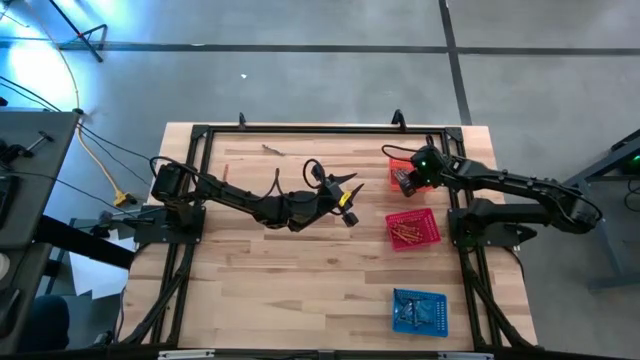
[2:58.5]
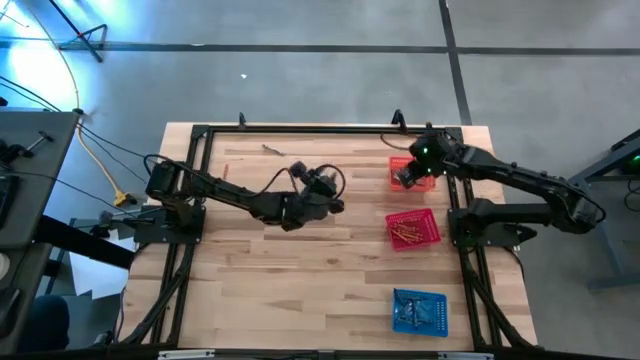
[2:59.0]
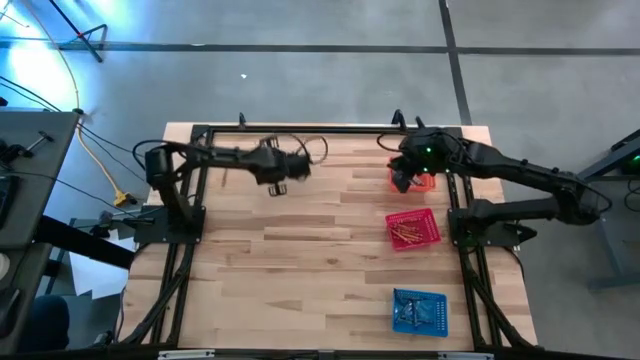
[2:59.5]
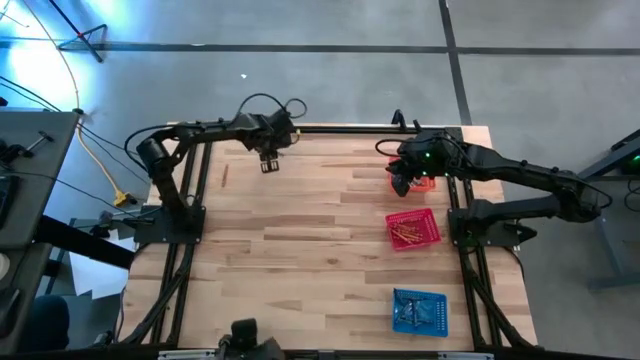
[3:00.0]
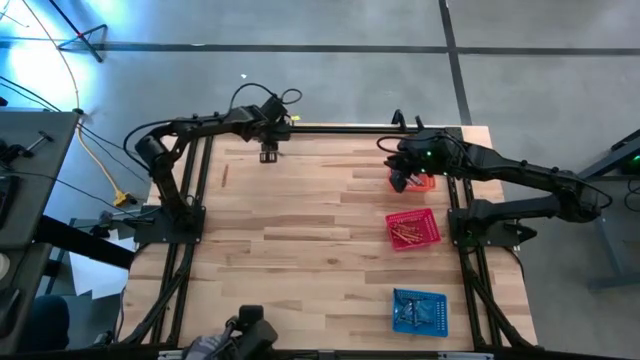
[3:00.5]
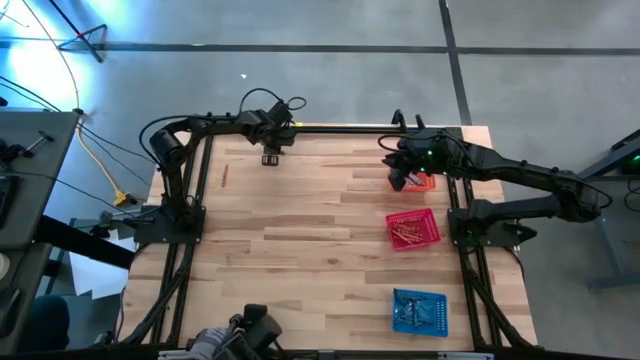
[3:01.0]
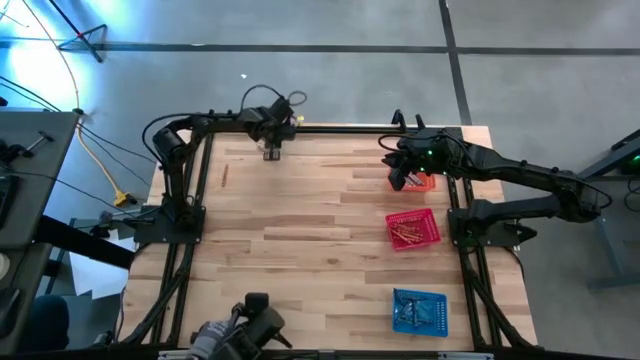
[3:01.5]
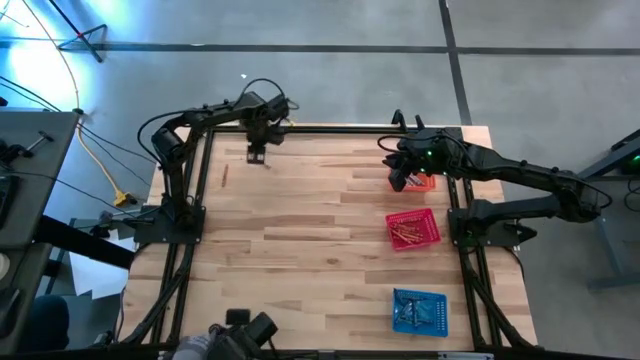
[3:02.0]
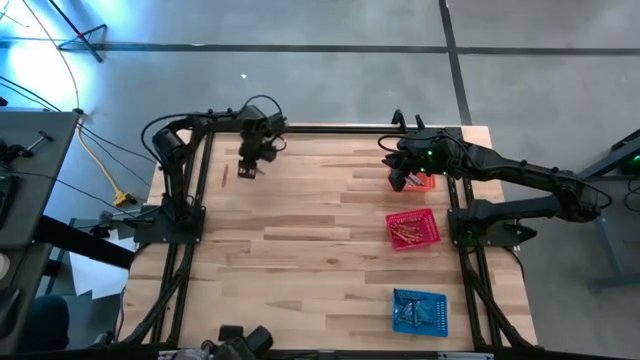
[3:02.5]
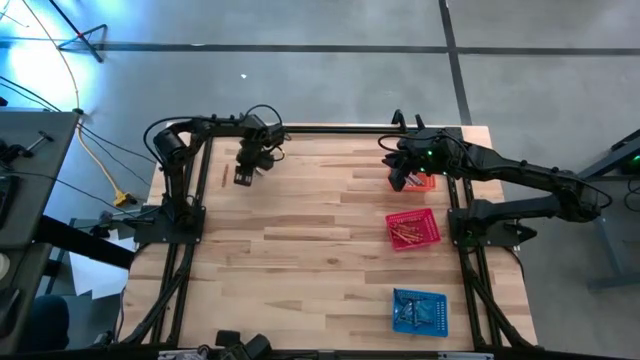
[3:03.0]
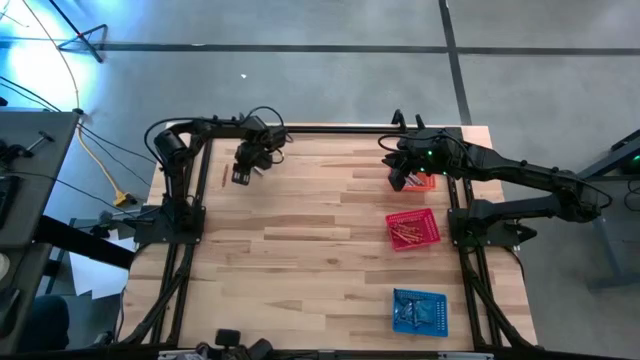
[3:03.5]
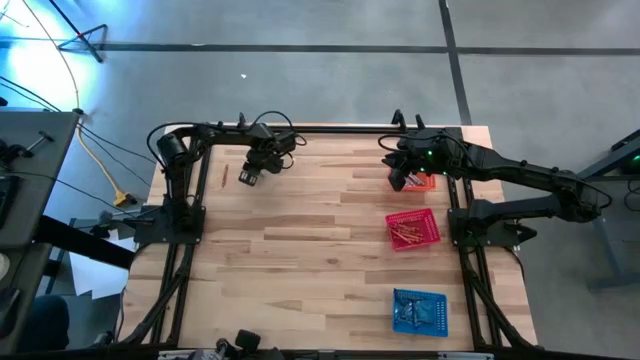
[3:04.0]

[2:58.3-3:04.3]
Task: Sort crayons
Put the gray crayon into the orange bin

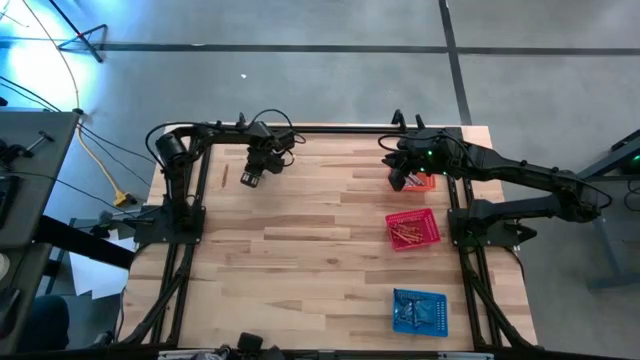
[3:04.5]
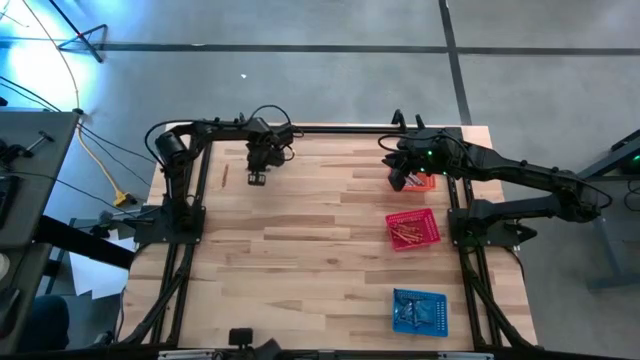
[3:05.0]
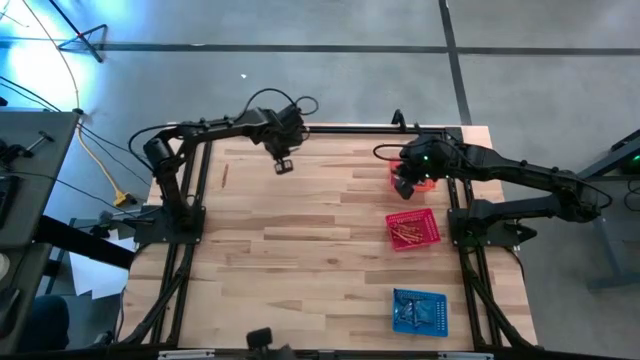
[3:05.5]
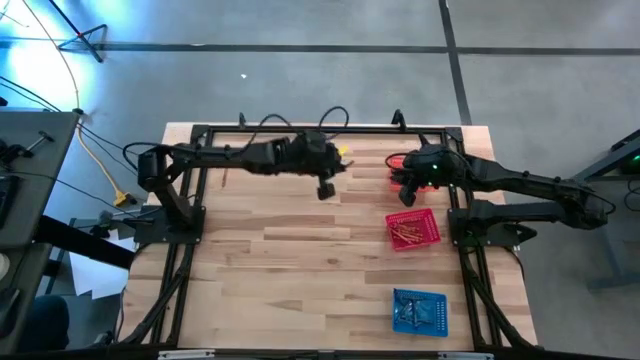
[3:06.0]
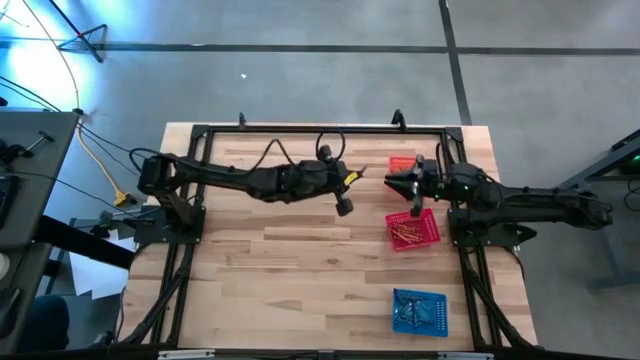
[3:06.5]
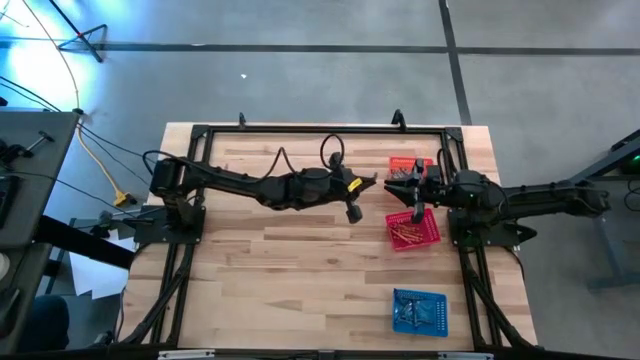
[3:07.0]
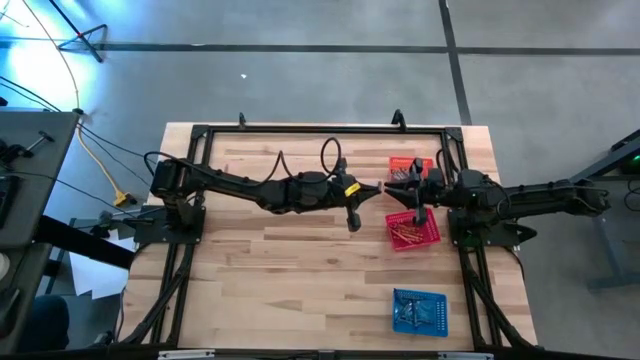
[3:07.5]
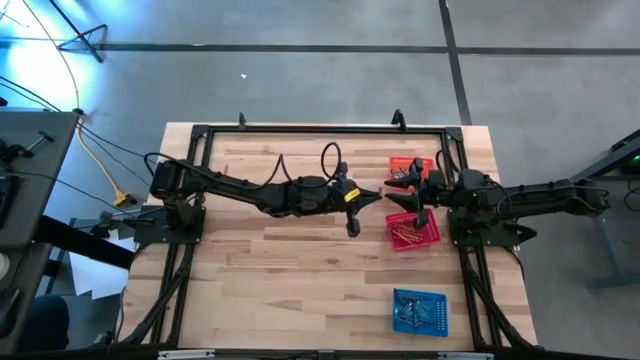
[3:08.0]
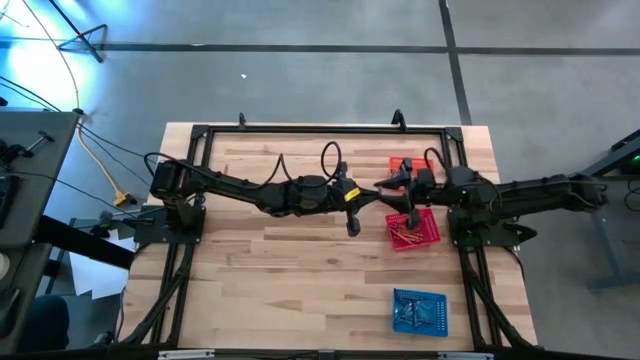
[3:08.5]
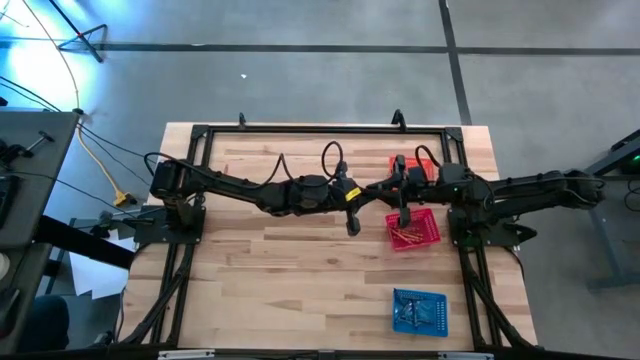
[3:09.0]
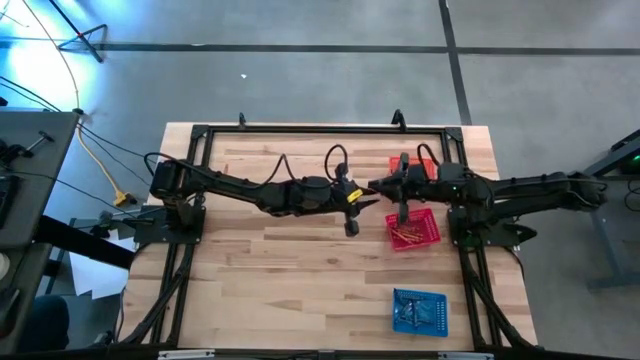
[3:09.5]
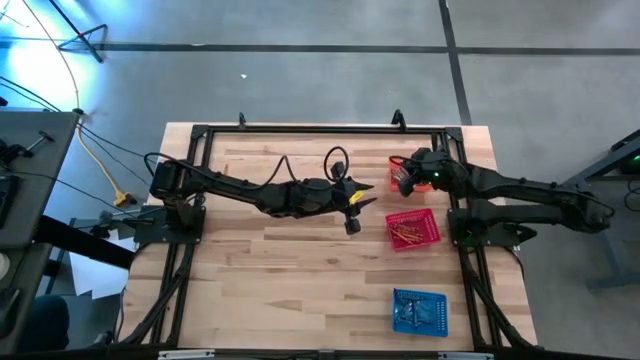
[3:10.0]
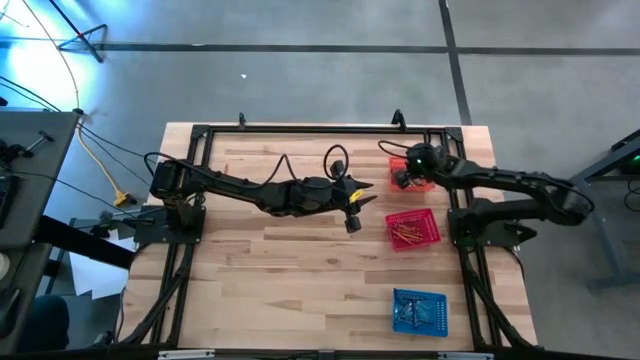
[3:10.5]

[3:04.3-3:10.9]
Put the gray crayon into the orange bin

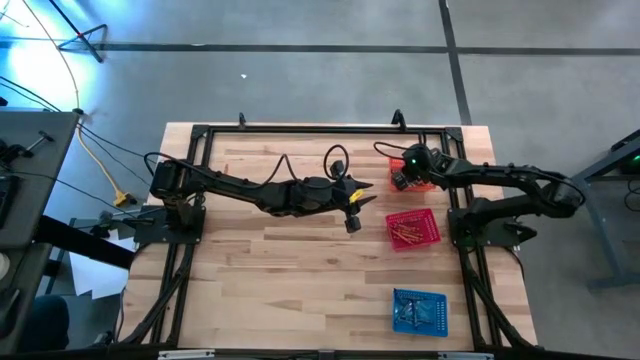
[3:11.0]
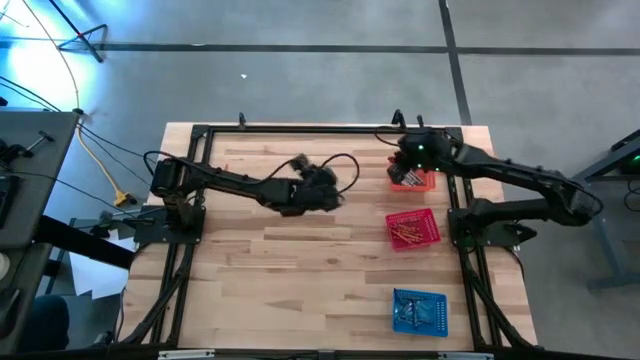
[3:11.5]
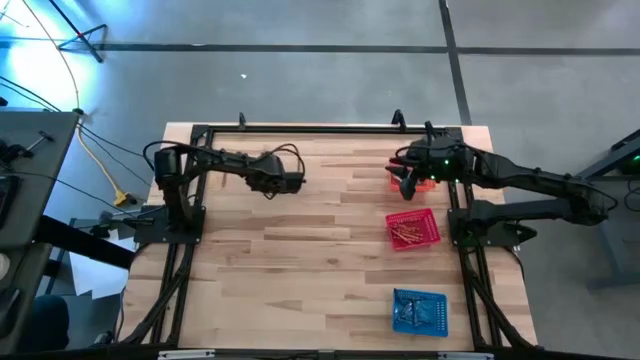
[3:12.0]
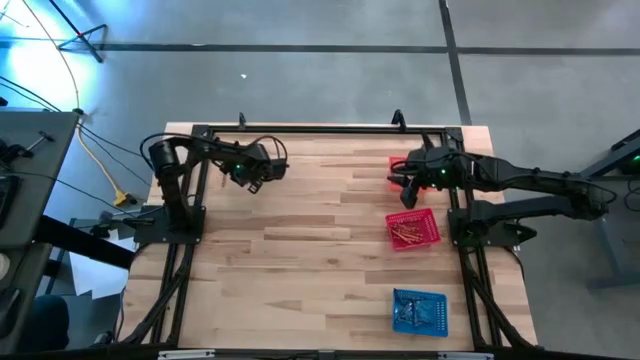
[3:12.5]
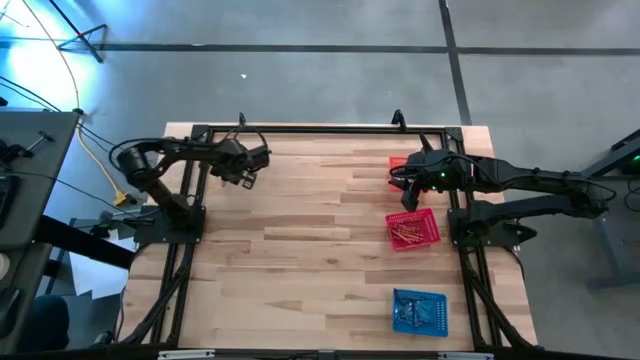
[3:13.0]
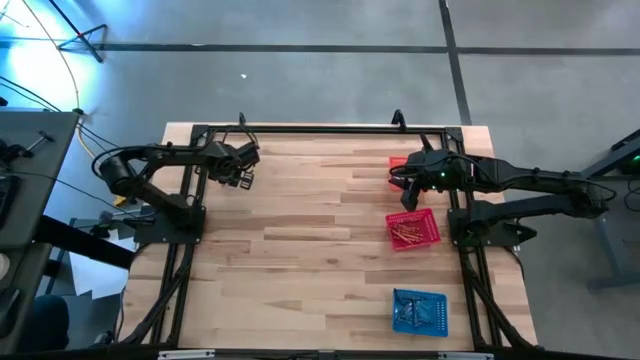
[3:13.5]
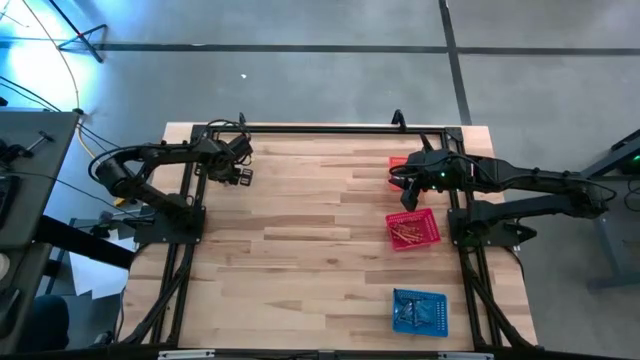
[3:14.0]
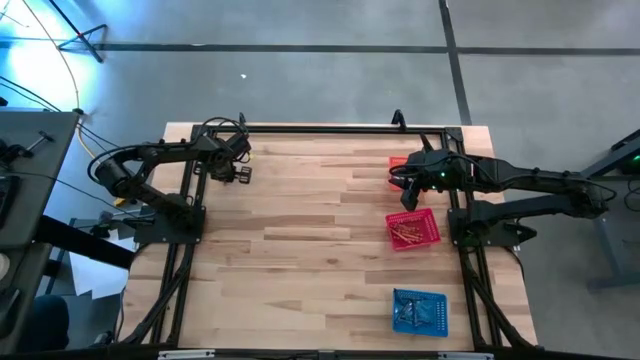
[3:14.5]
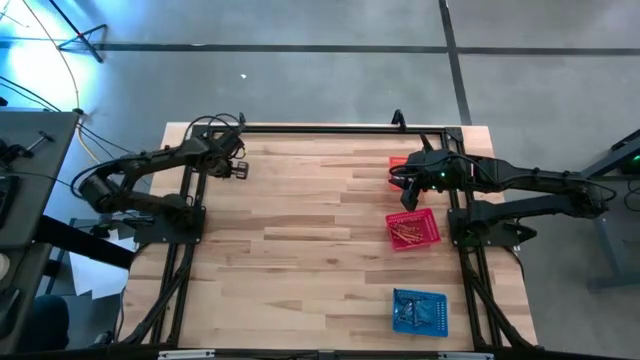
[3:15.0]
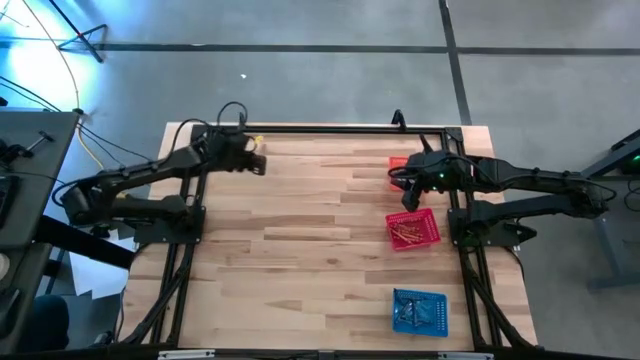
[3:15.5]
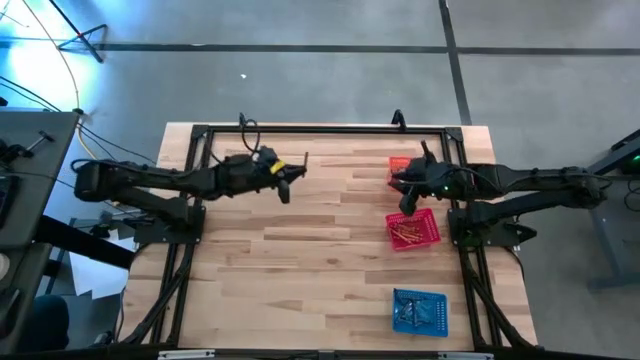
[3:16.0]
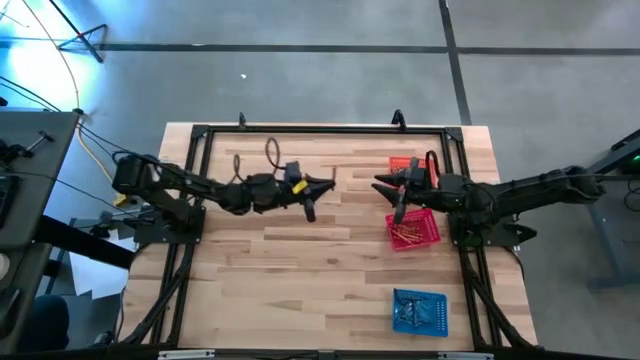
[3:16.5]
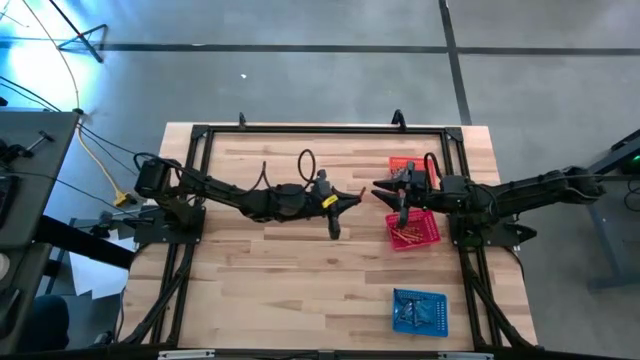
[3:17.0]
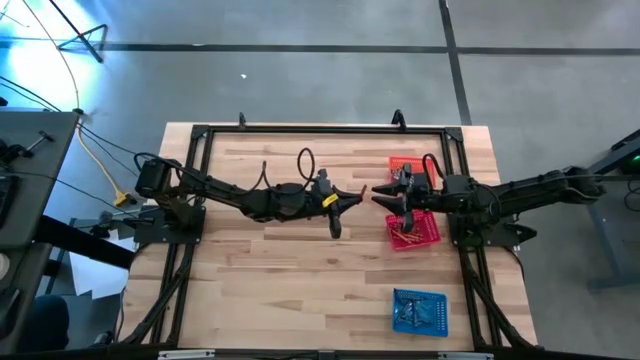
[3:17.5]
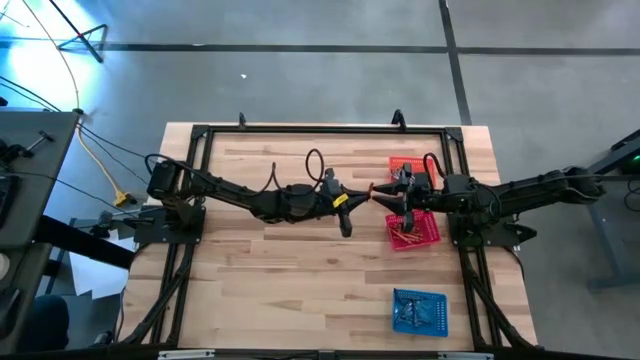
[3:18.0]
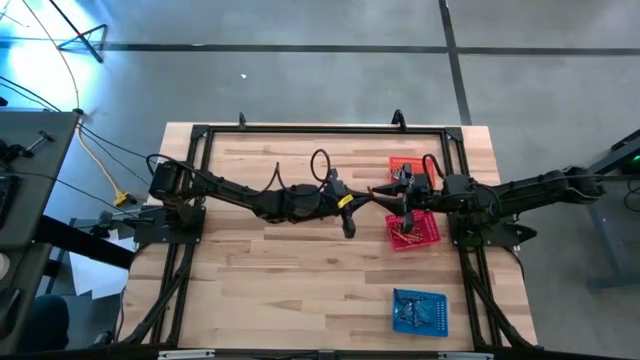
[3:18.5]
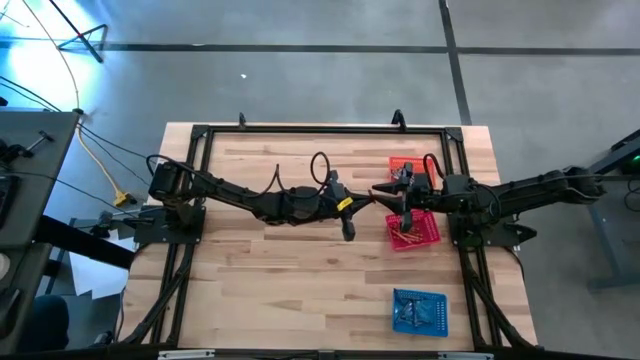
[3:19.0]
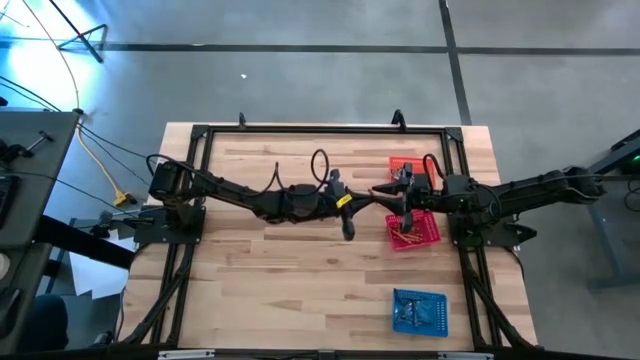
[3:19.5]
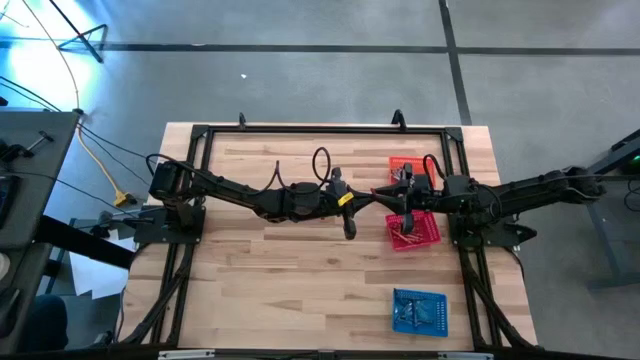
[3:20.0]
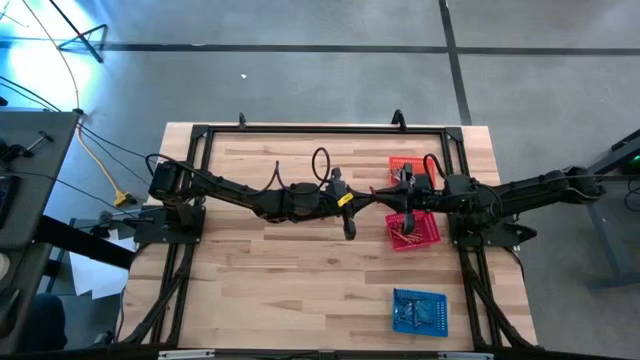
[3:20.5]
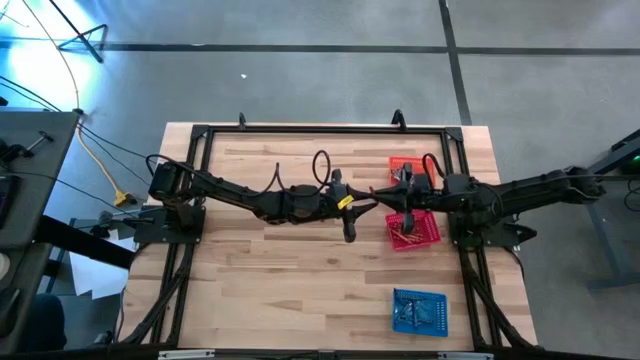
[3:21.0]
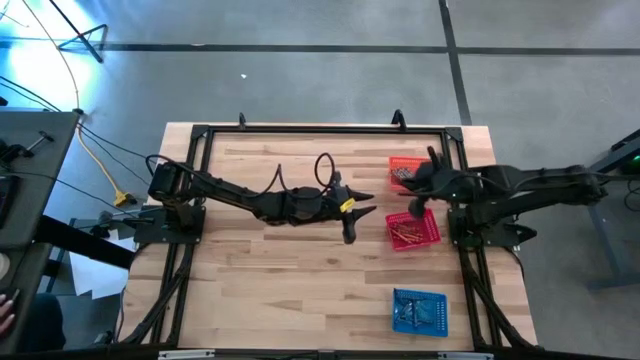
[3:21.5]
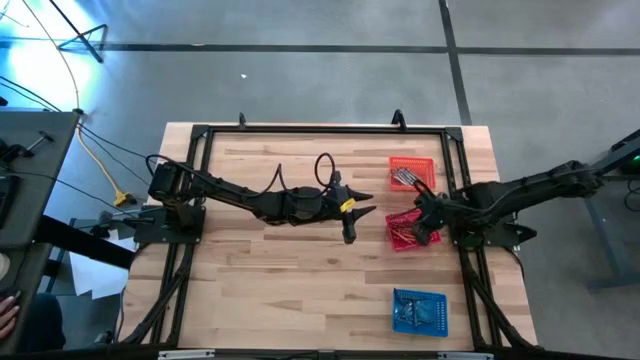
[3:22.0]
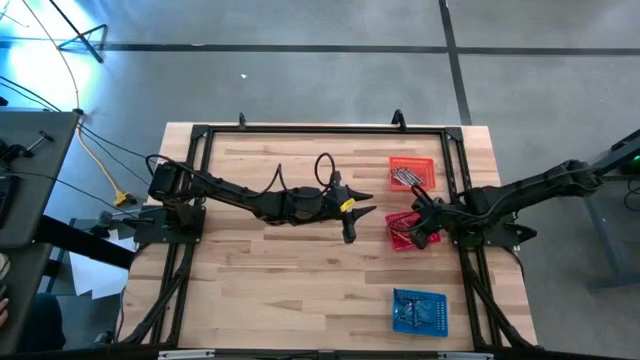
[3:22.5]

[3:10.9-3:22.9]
Put the orange crayon into the red bin
